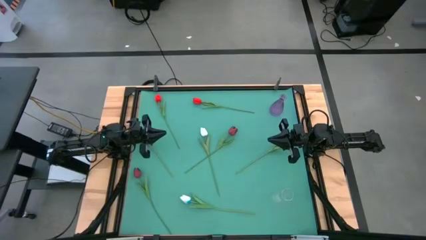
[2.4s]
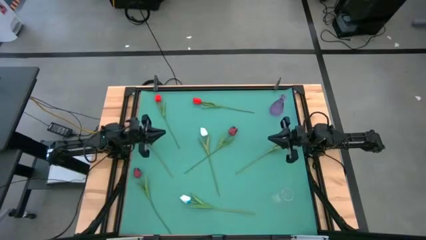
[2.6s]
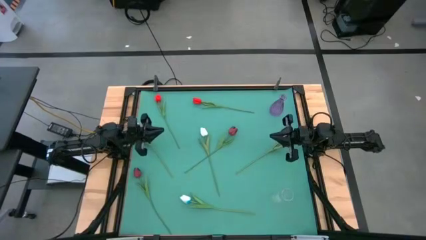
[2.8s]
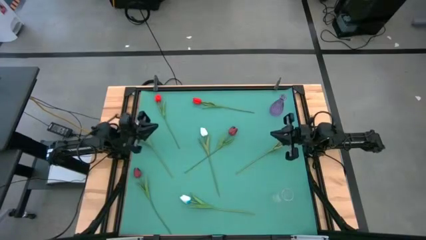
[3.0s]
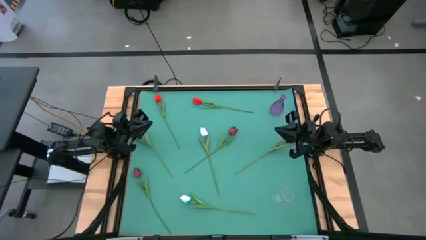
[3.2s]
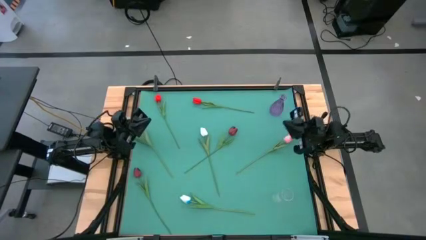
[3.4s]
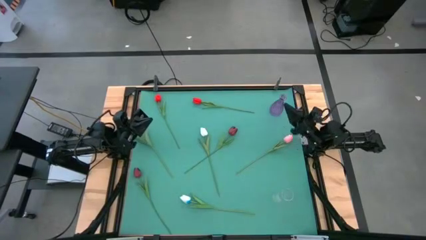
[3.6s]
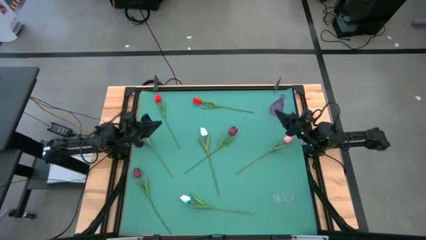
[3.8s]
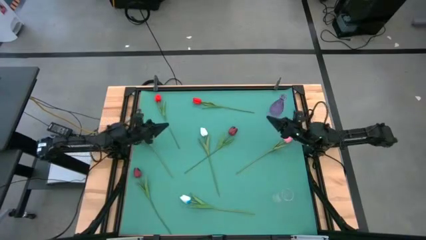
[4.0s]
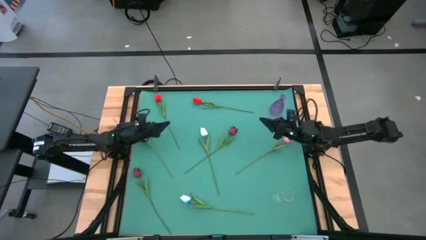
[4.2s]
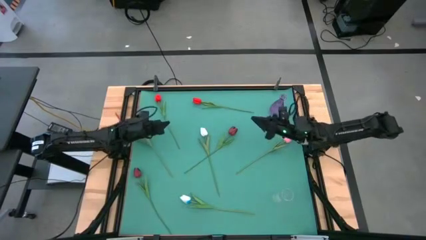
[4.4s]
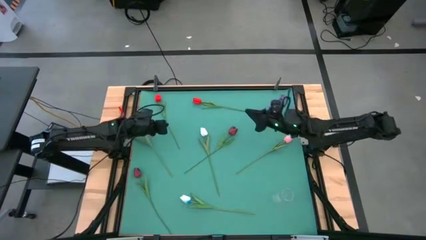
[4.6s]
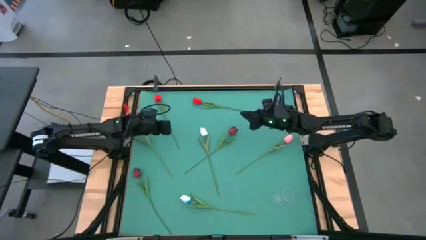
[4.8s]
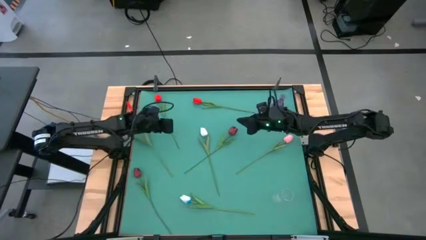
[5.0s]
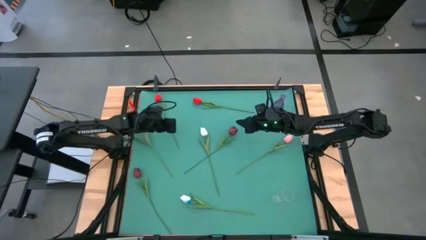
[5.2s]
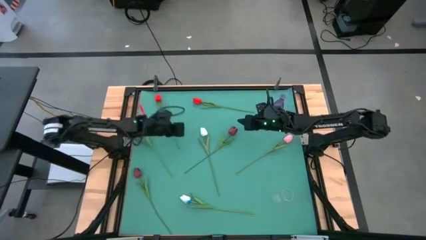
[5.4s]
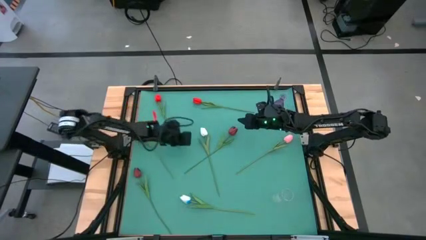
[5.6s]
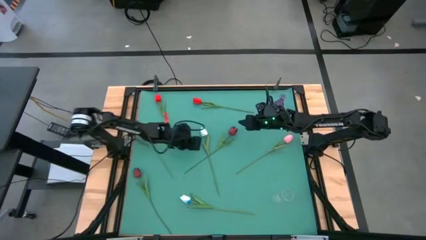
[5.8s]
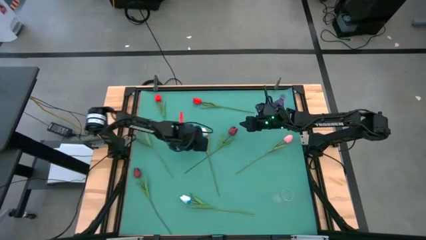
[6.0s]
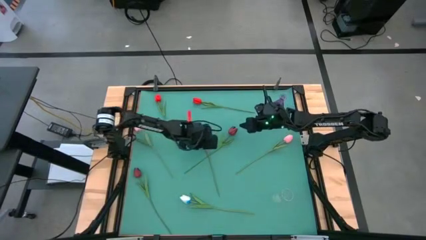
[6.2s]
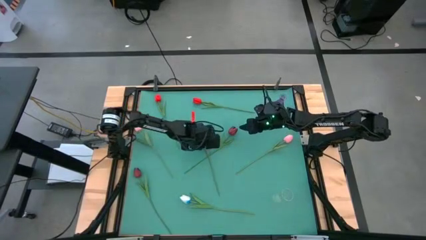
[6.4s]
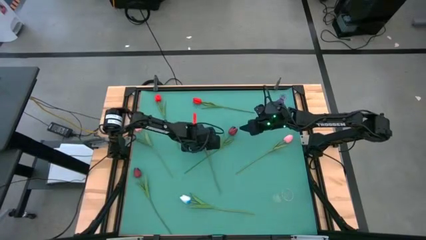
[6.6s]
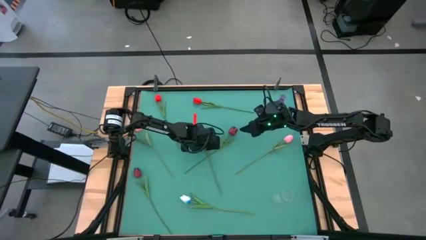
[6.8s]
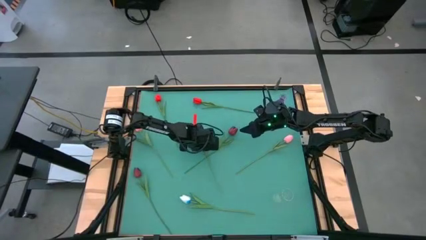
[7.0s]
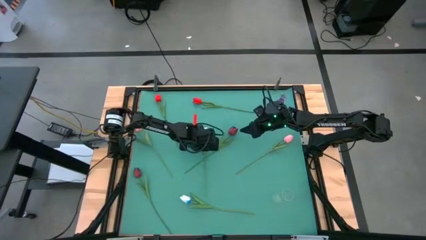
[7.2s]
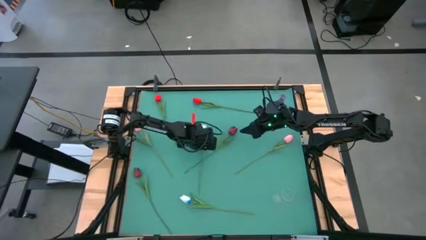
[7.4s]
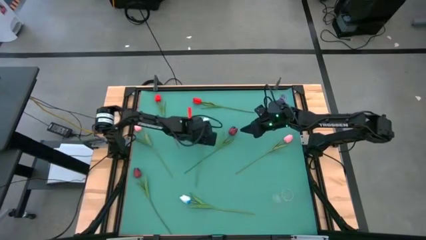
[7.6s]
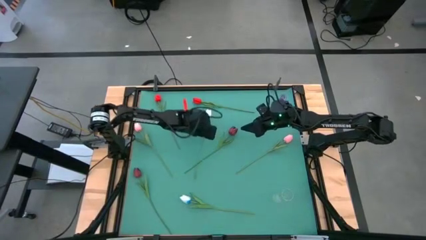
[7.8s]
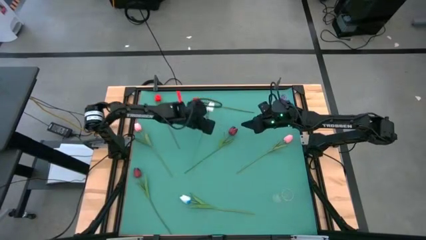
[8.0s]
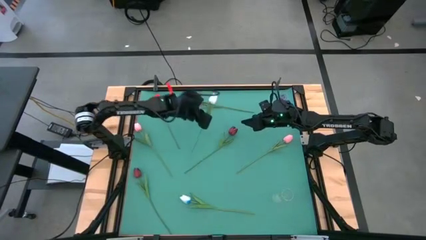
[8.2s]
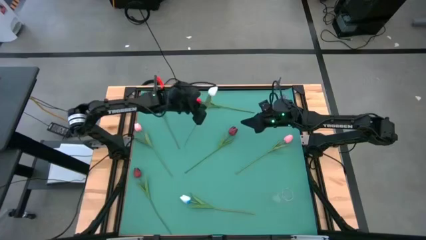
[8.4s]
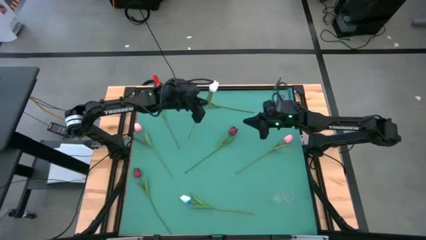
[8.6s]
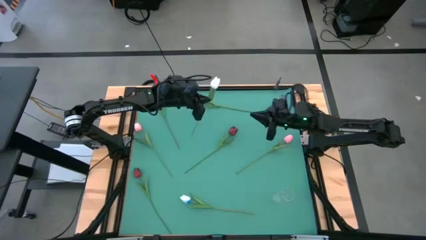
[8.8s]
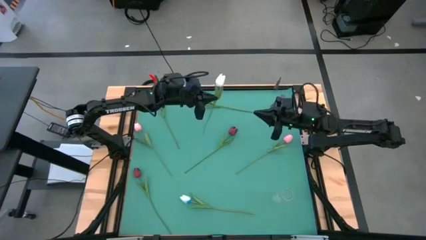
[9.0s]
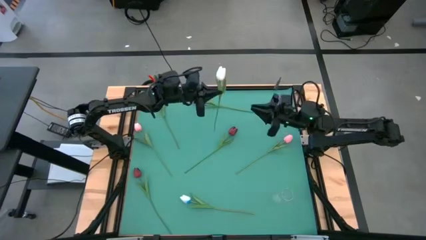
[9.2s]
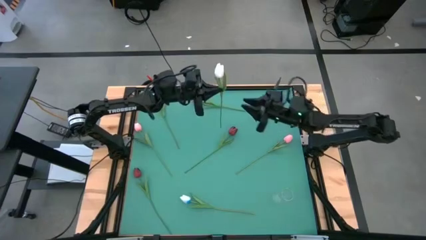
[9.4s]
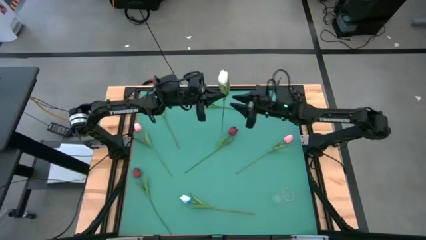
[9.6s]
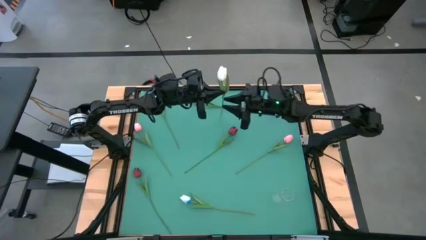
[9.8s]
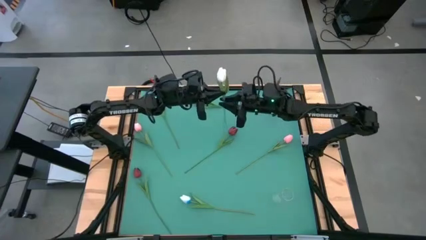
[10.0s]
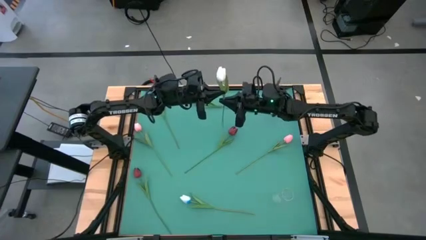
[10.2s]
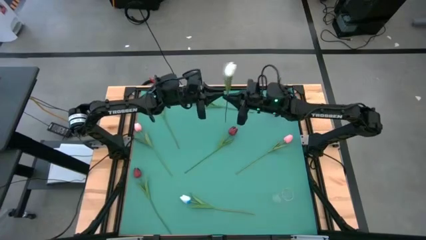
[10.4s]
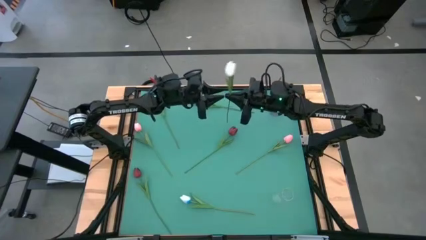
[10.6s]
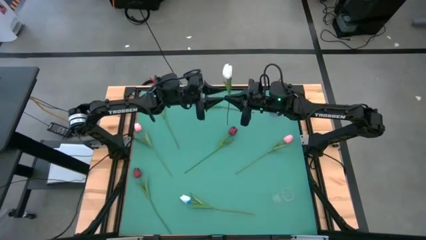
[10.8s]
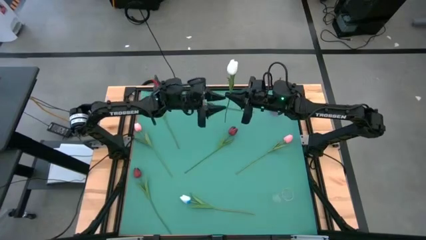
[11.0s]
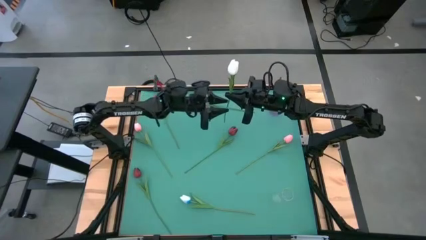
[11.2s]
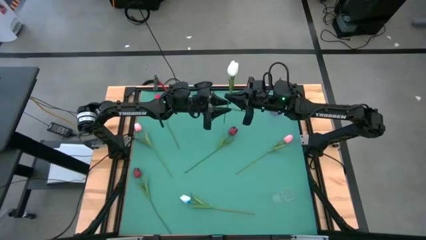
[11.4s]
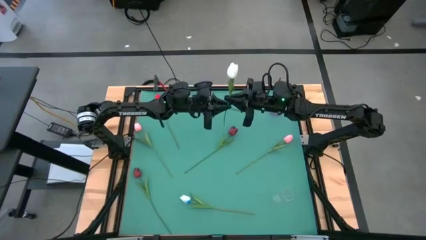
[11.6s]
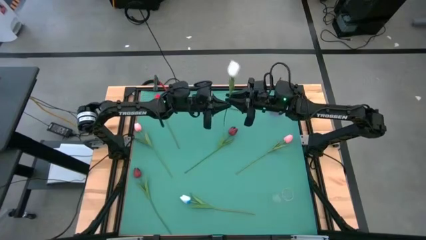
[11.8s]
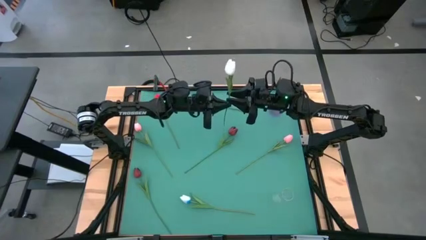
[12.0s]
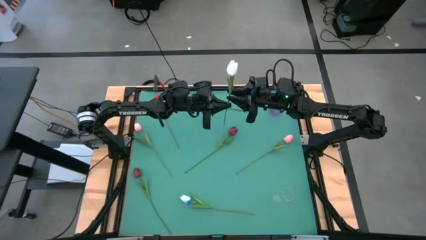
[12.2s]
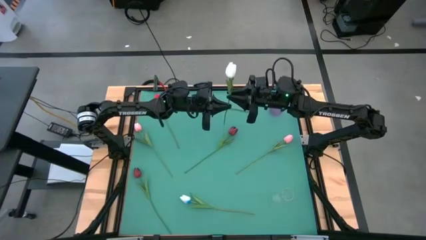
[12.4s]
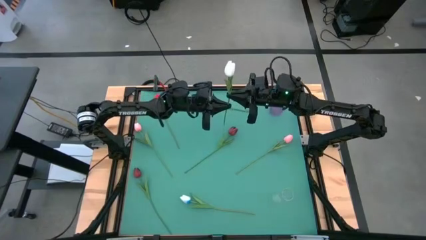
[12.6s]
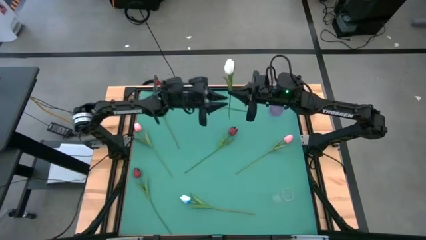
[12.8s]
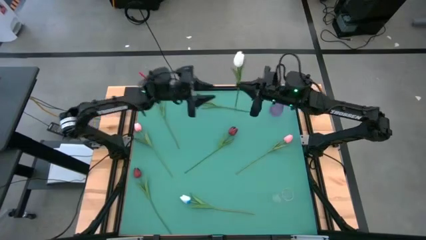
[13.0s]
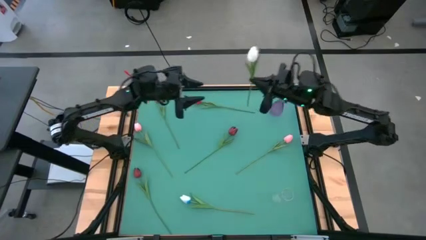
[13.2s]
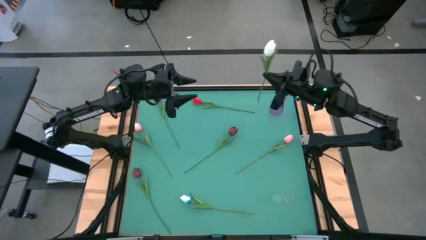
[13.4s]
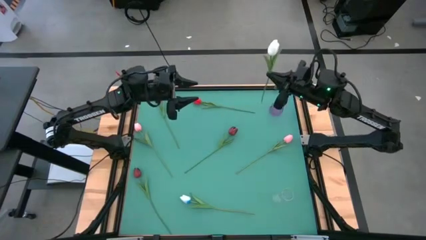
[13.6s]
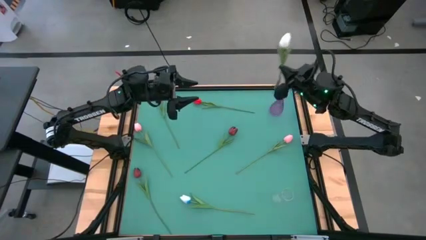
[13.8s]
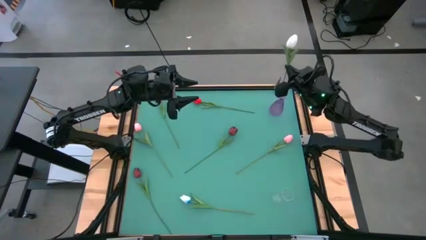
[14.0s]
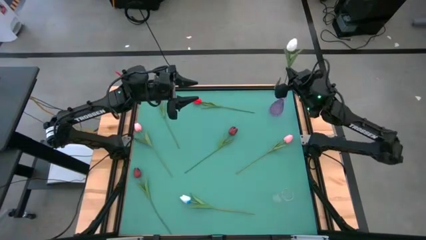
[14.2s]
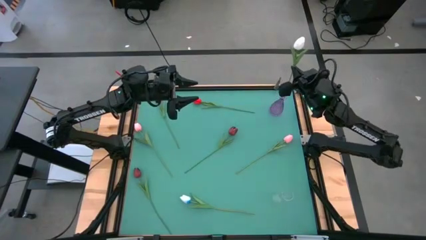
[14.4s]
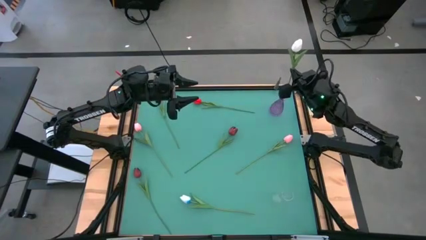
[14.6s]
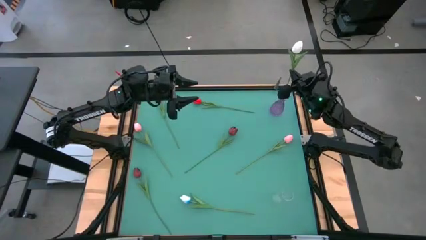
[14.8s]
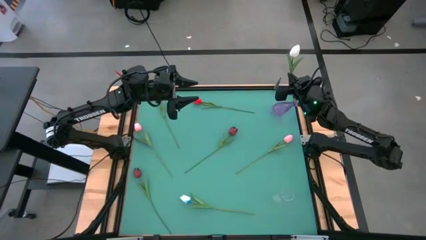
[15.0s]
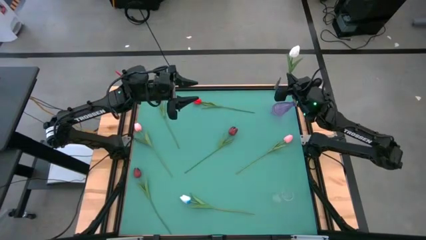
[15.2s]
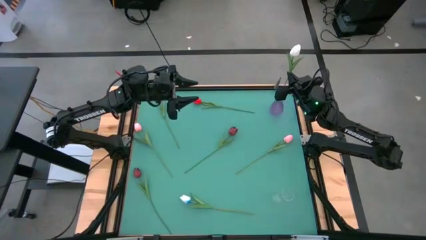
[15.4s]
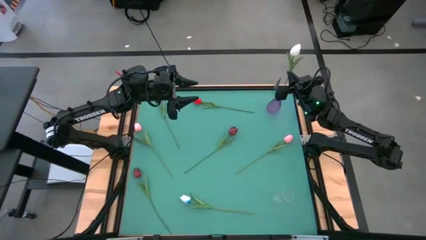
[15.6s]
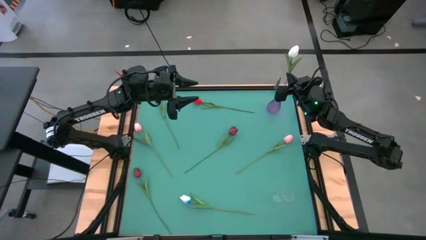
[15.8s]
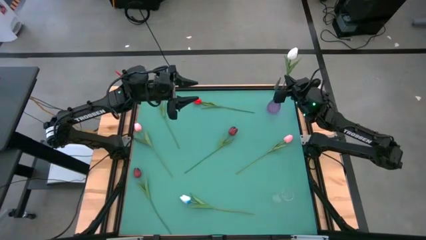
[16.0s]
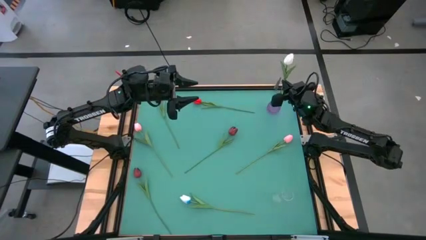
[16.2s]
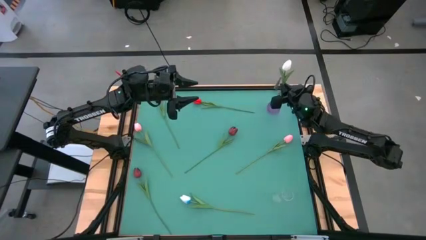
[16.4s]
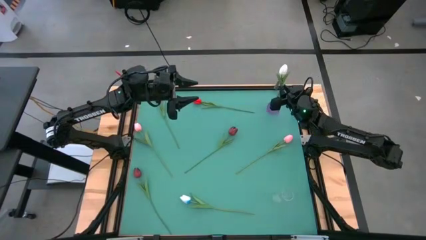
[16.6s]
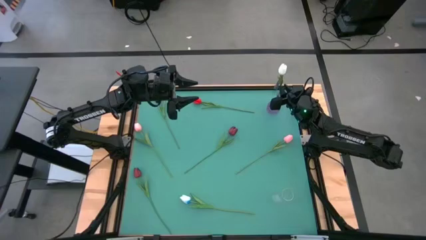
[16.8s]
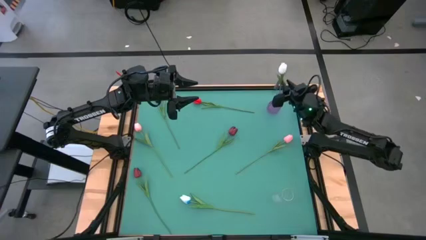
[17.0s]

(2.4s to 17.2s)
Task: Sort flowers into vase by color
Put the top white flower into the violet vase
